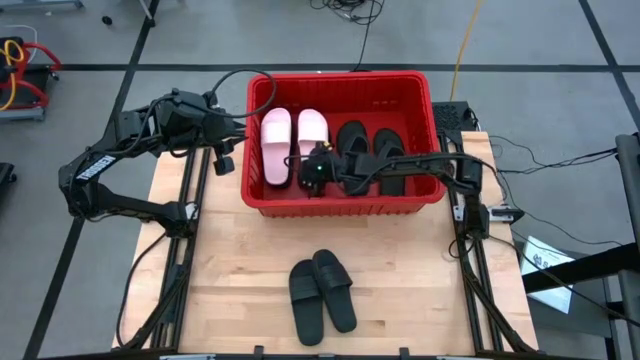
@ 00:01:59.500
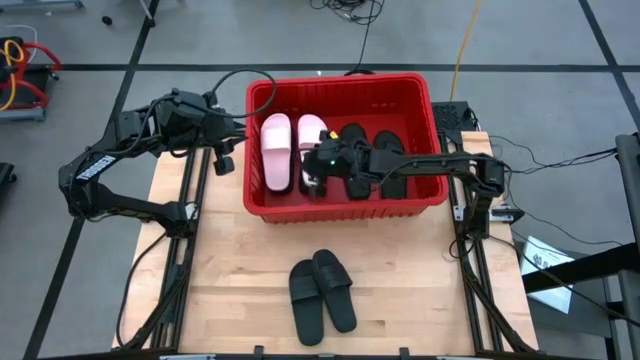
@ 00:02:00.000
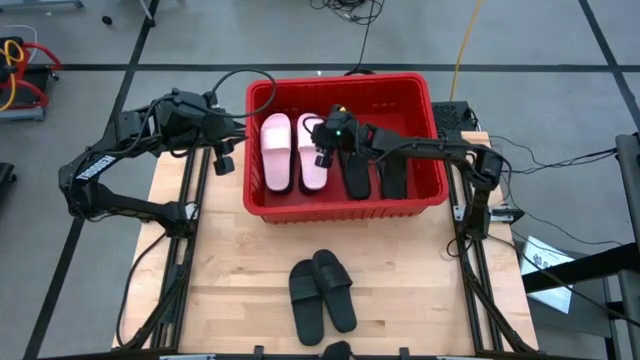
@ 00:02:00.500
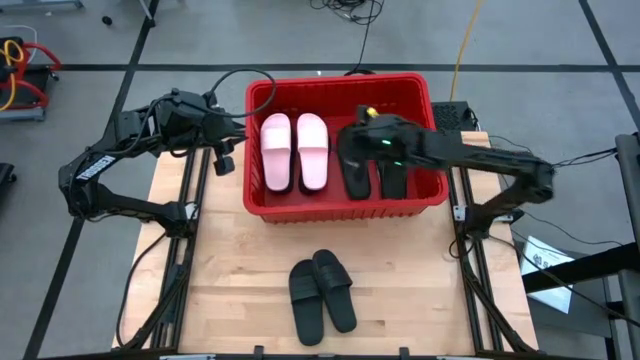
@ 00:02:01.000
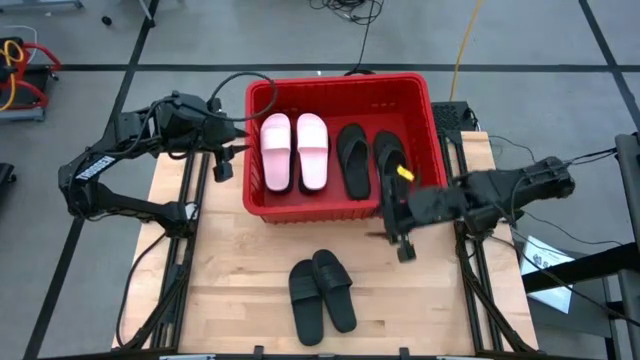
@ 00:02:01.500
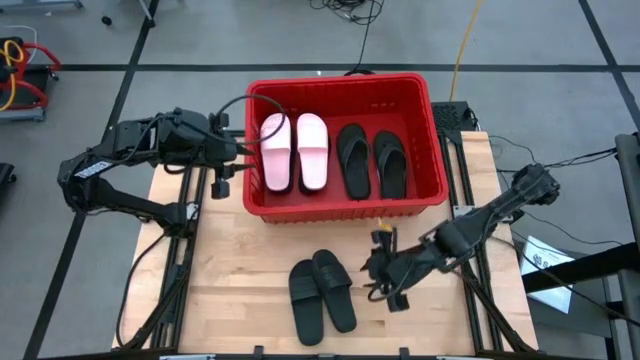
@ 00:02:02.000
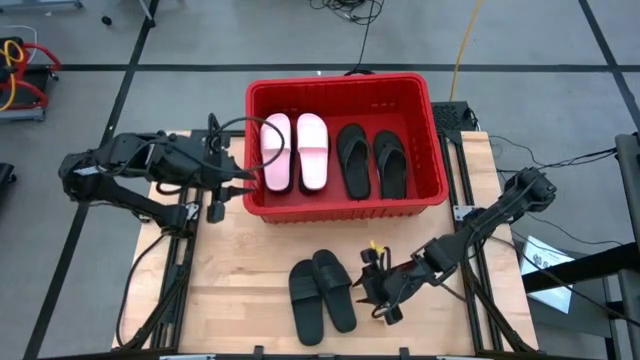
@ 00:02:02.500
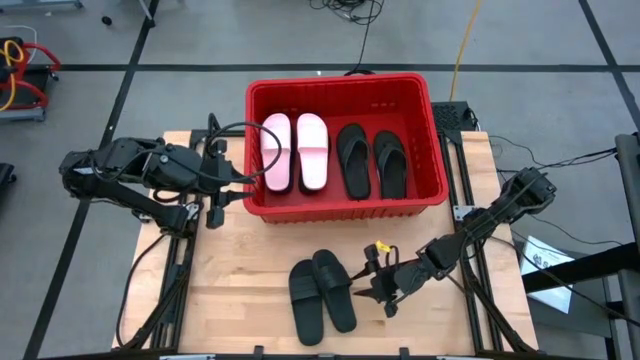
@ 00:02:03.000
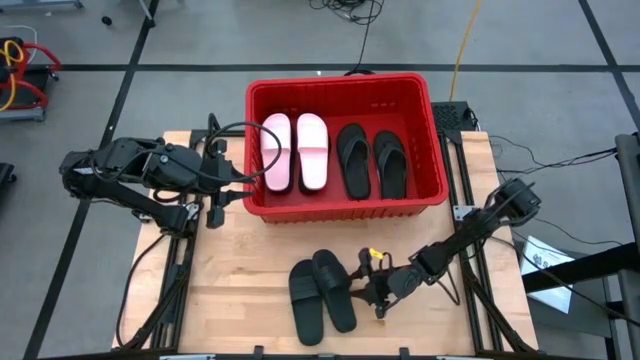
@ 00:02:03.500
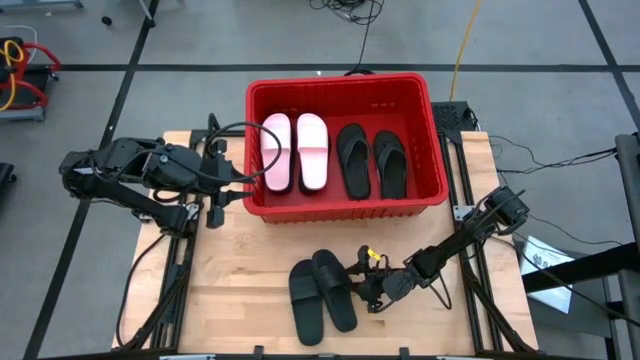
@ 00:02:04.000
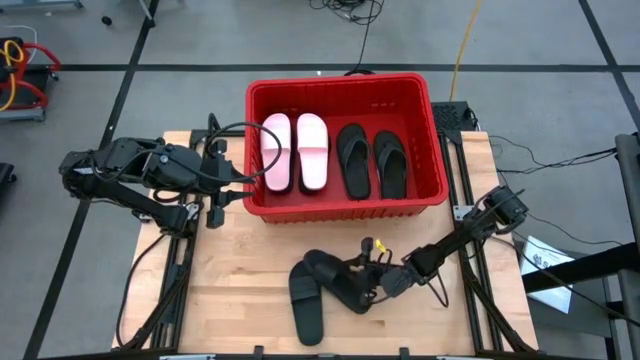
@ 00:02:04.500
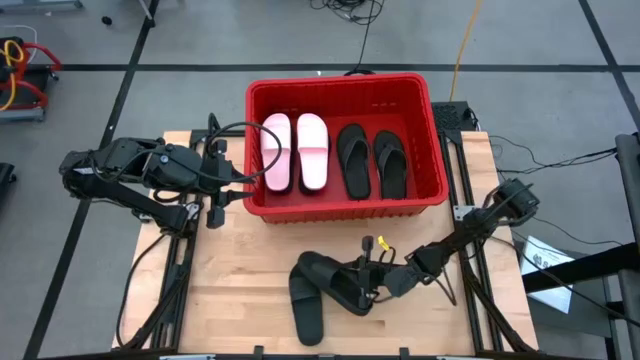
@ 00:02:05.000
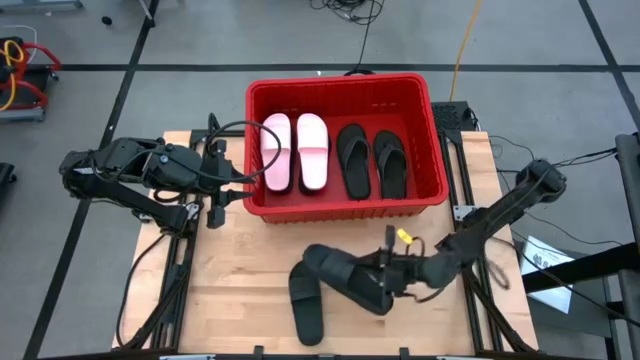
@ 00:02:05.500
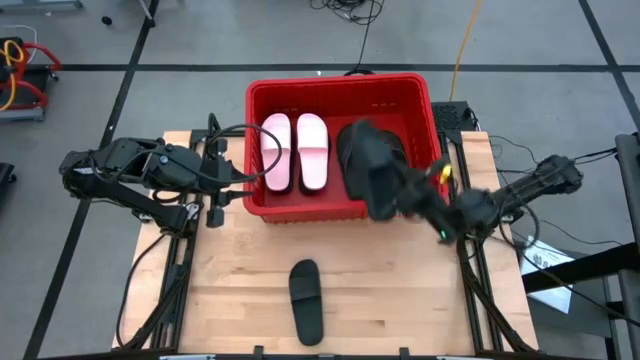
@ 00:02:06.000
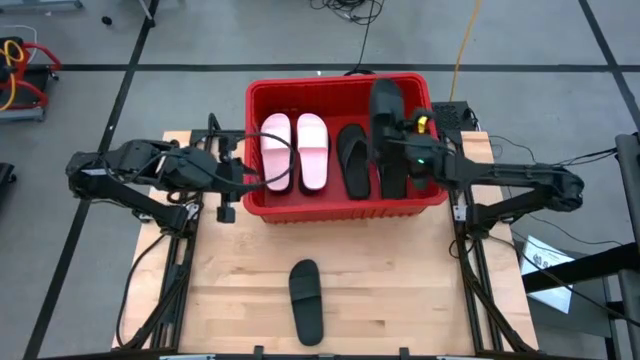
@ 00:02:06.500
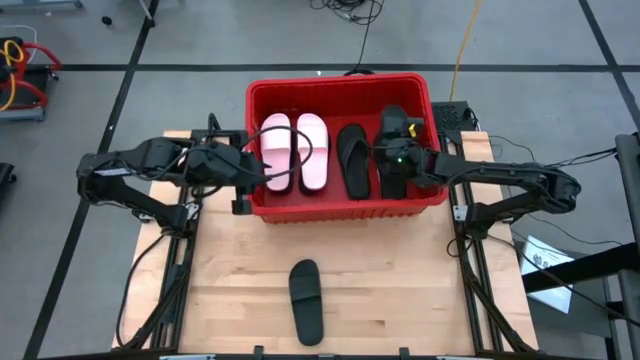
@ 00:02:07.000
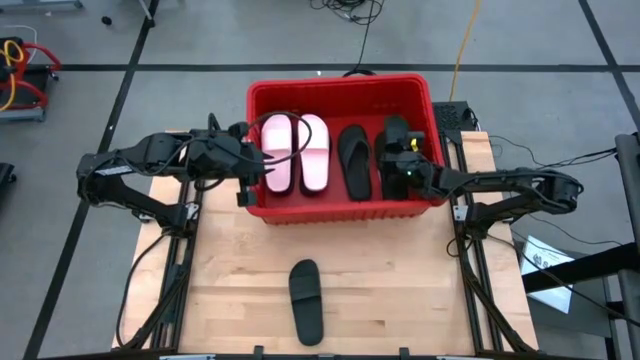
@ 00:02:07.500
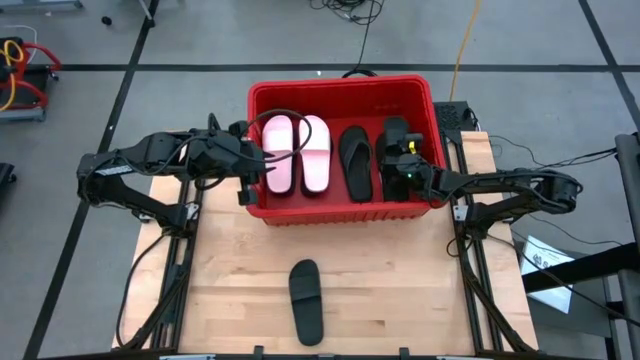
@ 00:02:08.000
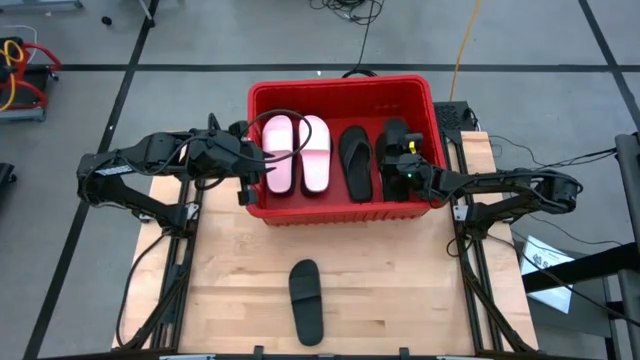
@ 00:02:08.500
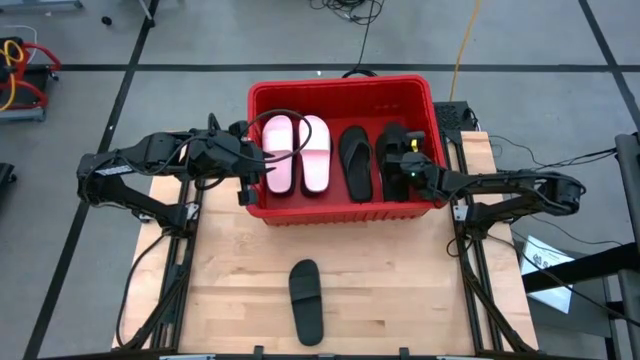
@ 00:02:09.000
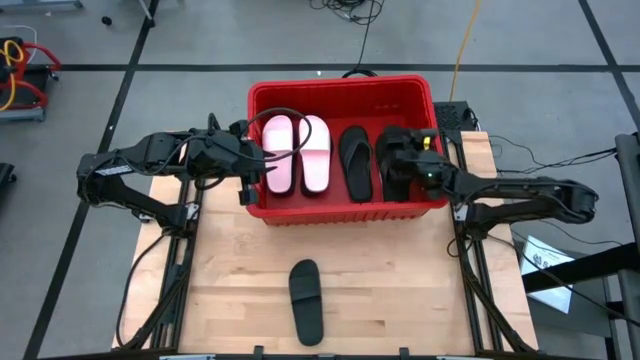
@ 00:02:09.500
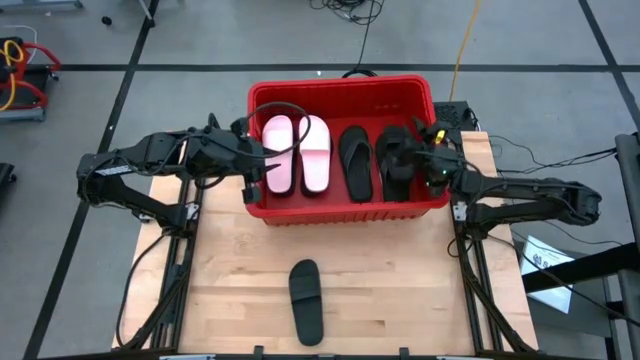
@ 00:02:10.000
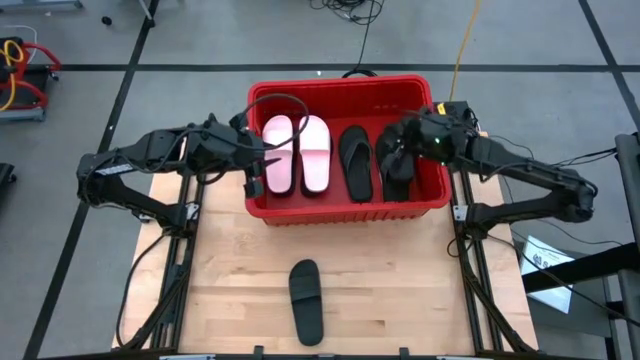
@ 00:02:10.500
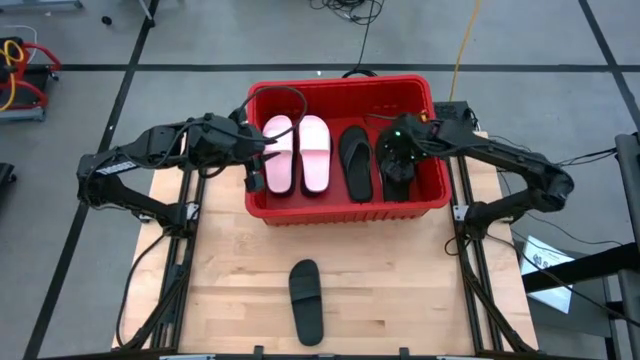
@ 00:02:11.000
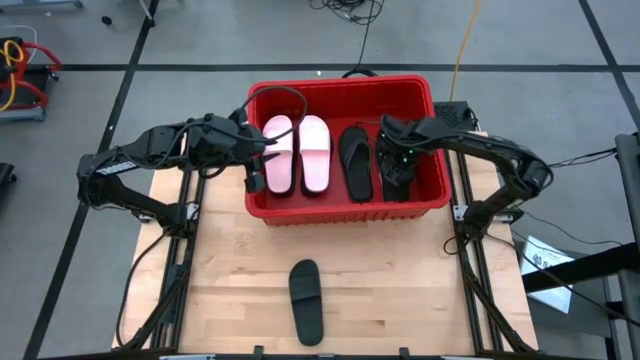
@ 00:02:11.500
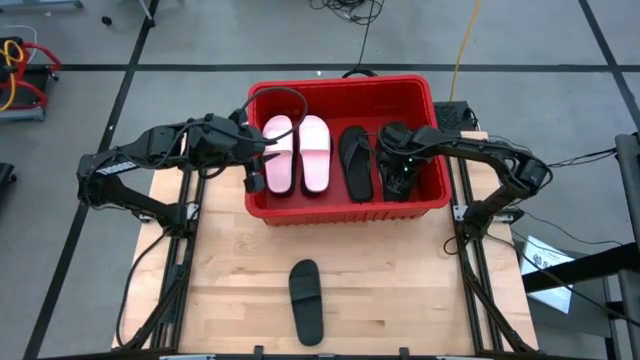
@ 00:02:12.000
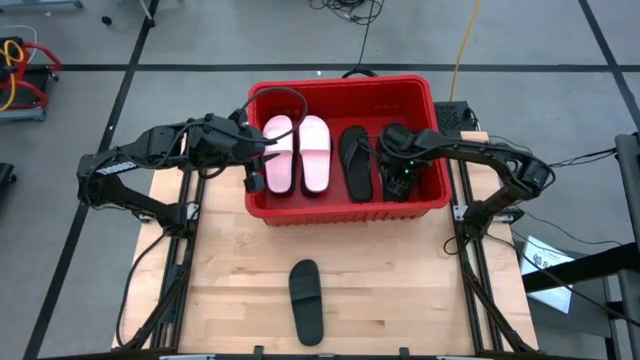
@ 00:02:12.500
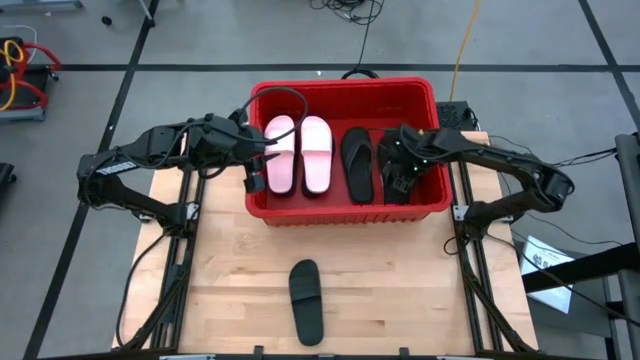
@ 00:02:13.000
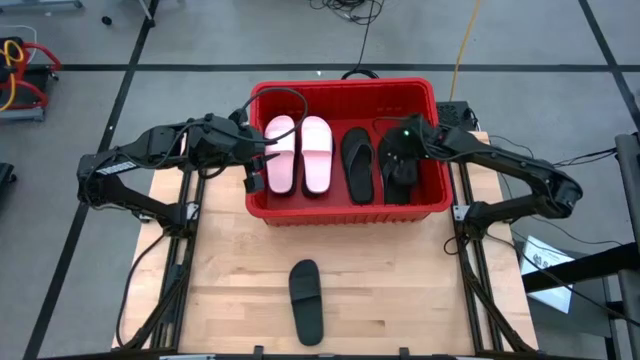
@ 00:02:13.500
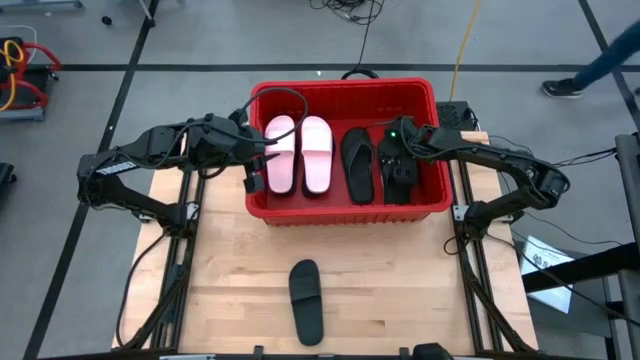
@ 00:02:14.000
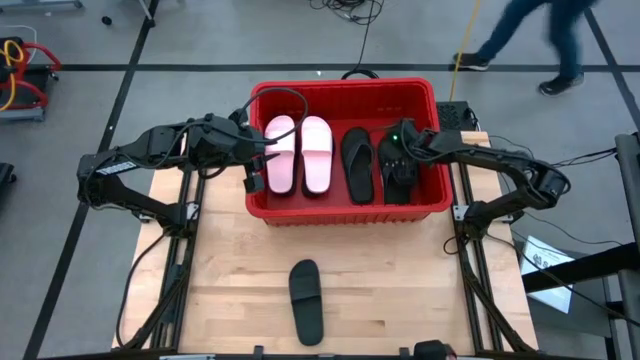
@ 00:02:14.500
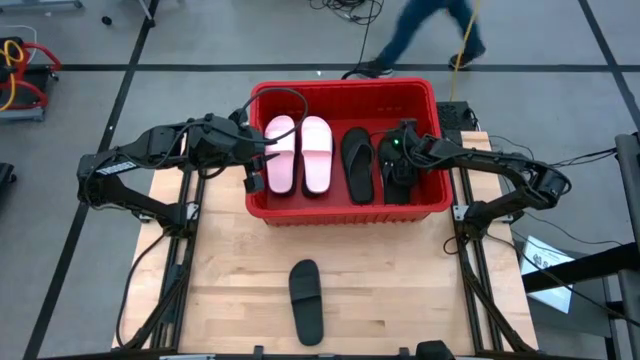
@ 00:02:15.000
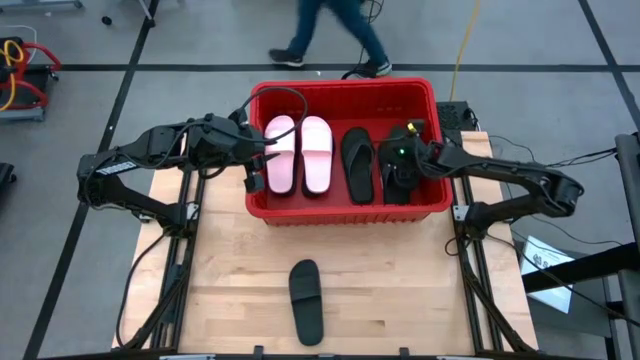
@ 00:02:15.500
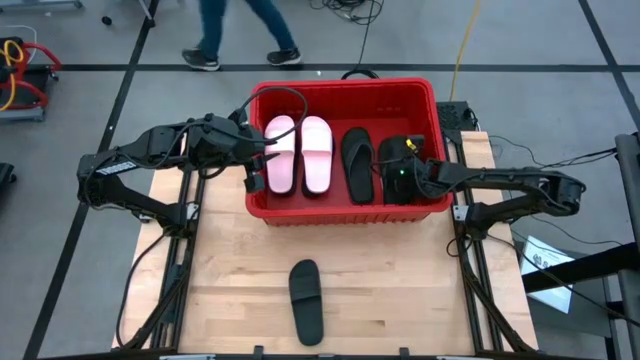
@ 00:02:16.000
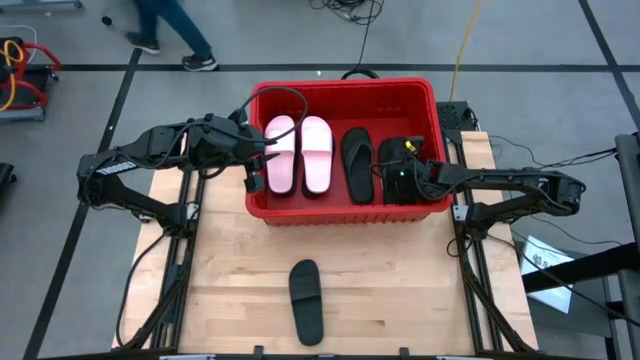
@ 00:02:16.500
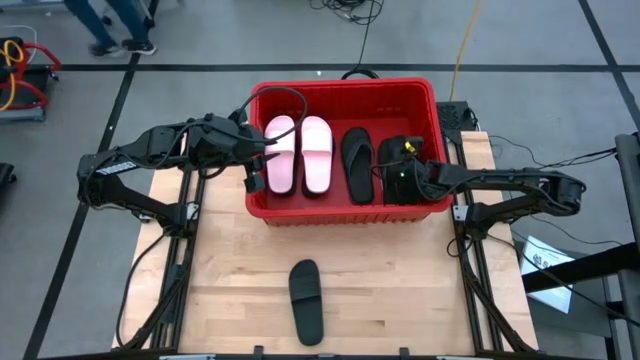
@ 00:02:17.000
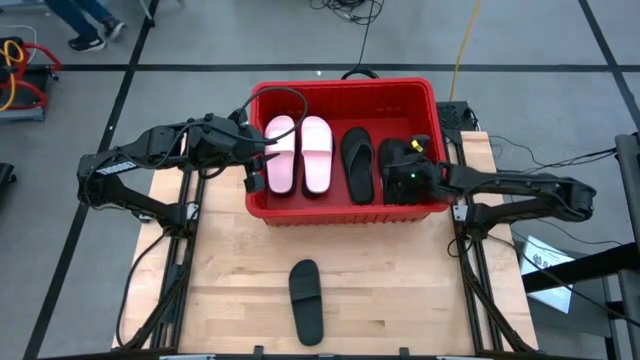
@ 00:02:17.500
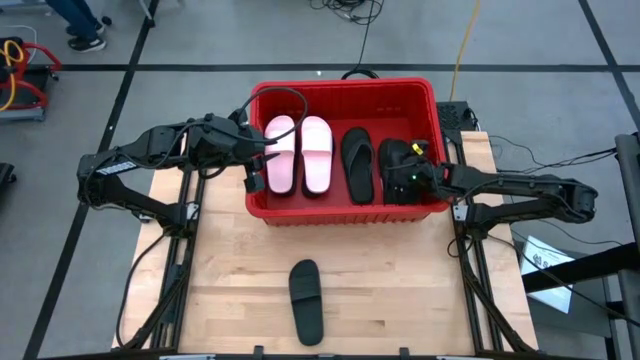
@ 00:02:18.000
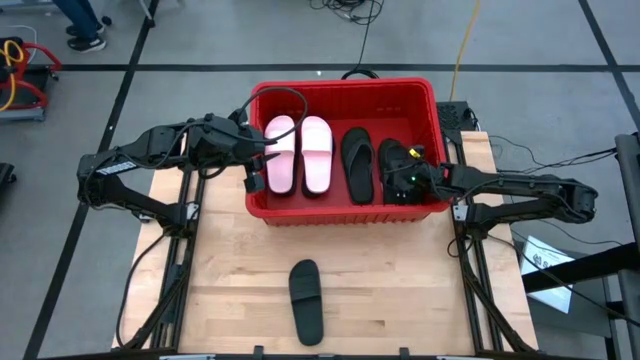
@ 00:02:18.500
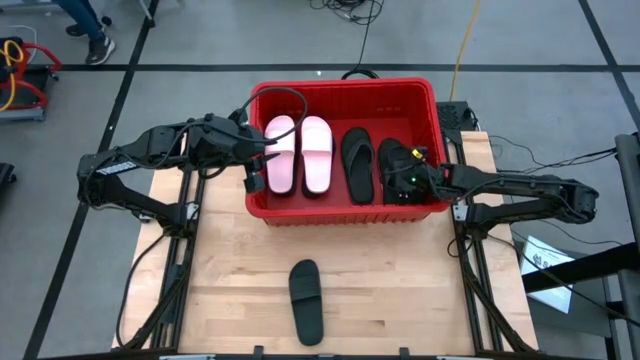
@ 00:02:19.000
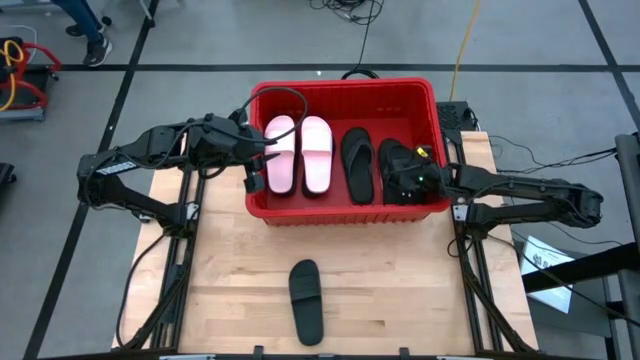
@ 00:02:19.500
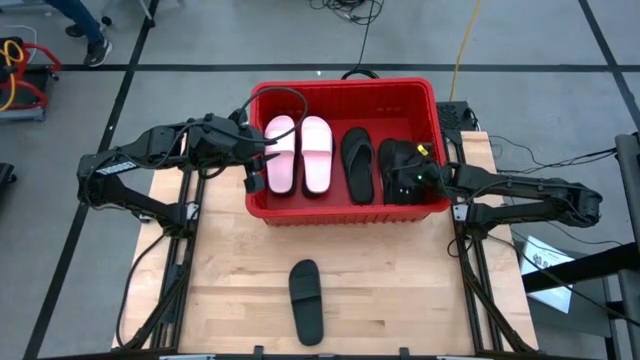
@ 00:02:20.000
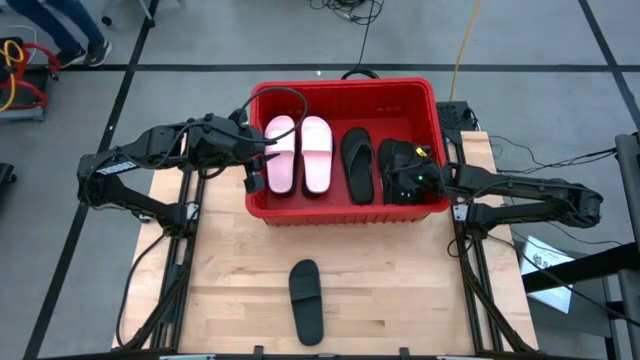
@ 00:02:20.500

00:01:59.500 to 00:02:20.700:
Task: Pick and place slides into bin
Put the black slide into the red container
